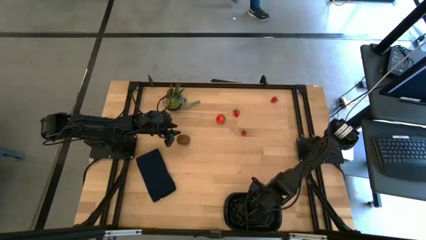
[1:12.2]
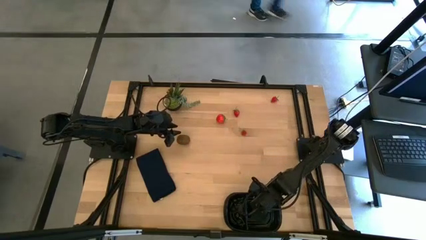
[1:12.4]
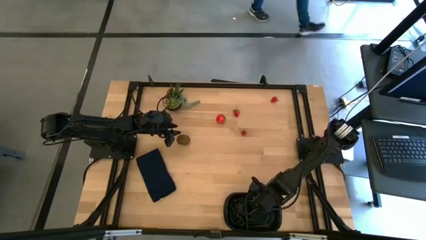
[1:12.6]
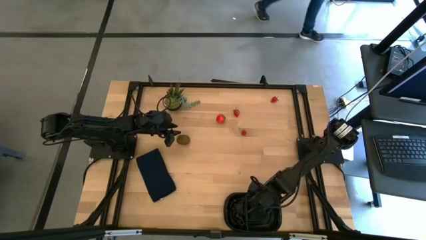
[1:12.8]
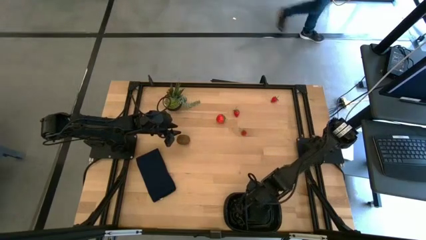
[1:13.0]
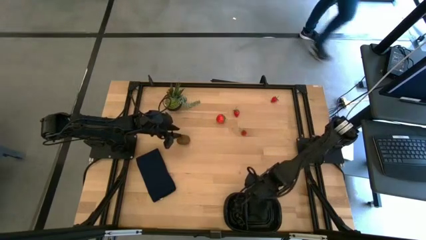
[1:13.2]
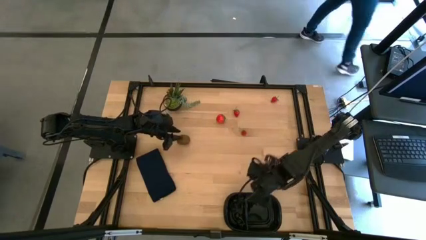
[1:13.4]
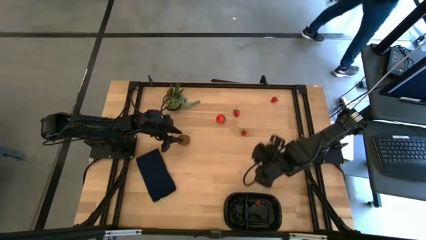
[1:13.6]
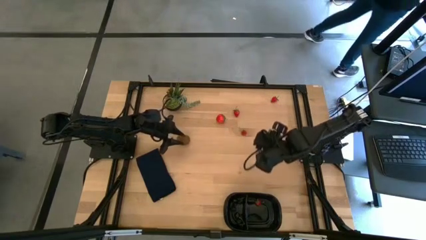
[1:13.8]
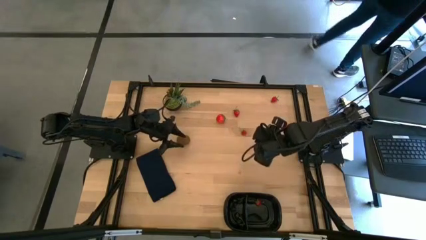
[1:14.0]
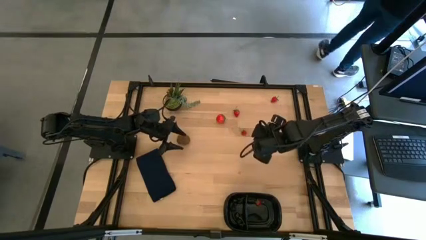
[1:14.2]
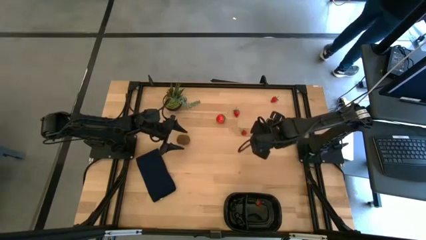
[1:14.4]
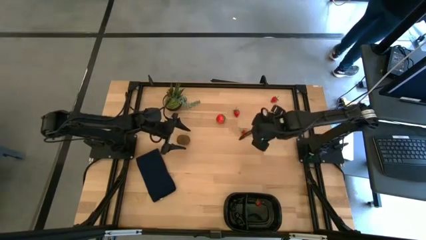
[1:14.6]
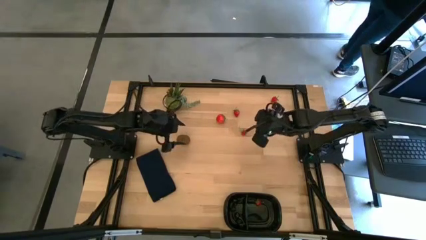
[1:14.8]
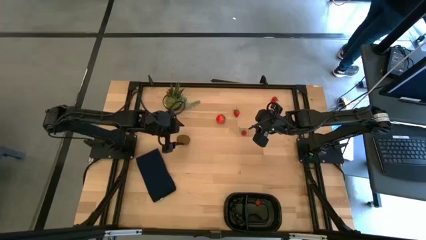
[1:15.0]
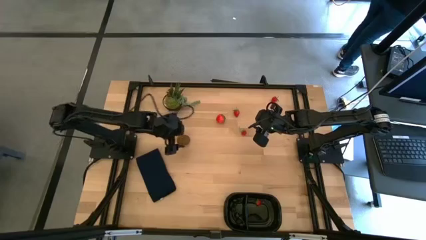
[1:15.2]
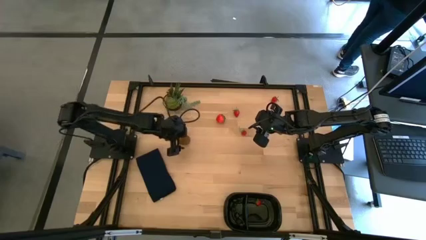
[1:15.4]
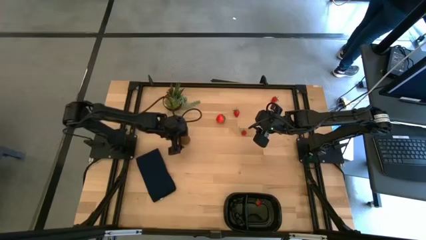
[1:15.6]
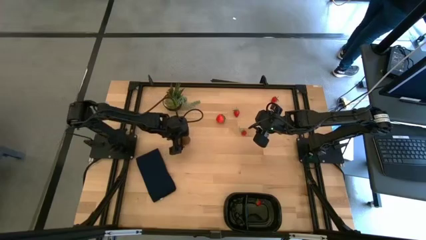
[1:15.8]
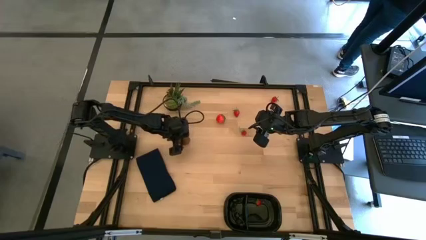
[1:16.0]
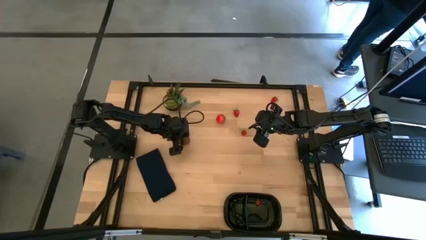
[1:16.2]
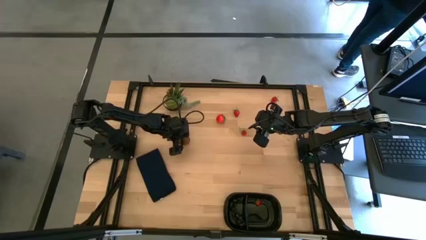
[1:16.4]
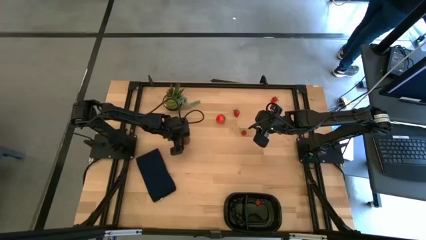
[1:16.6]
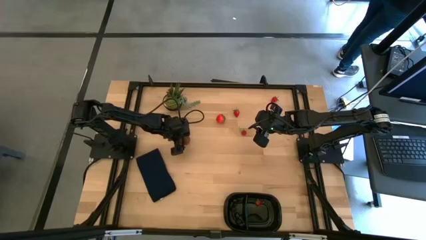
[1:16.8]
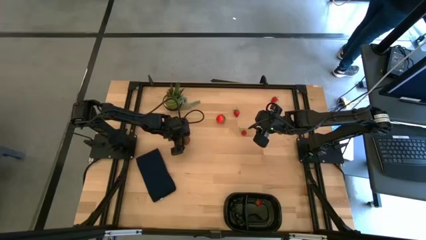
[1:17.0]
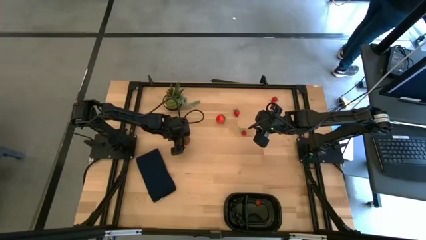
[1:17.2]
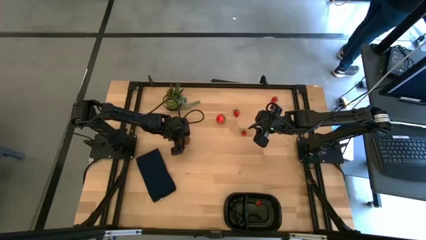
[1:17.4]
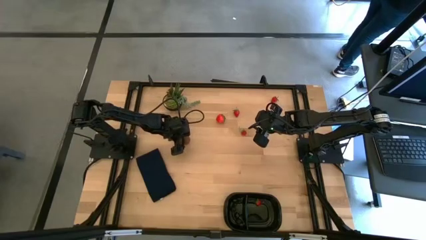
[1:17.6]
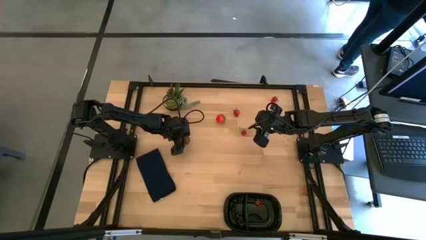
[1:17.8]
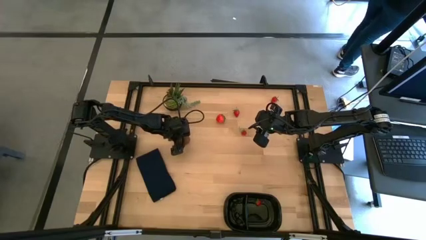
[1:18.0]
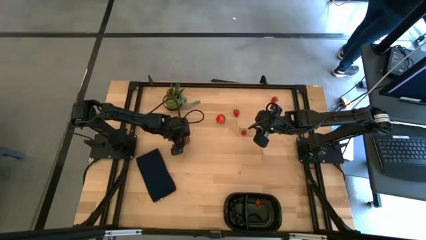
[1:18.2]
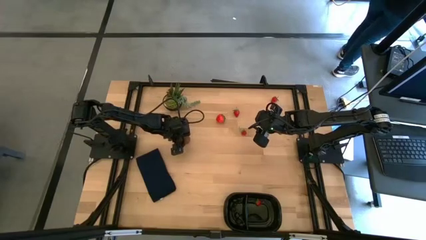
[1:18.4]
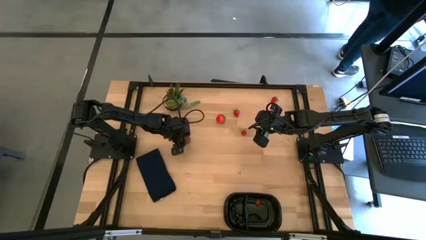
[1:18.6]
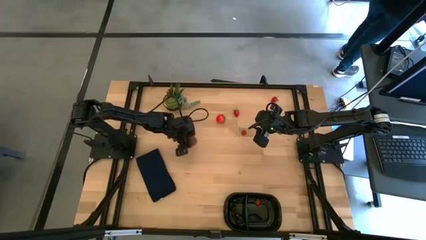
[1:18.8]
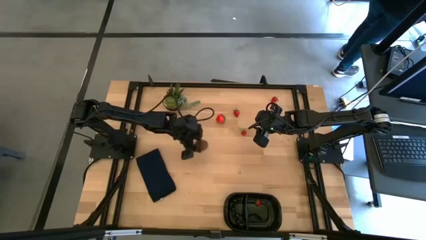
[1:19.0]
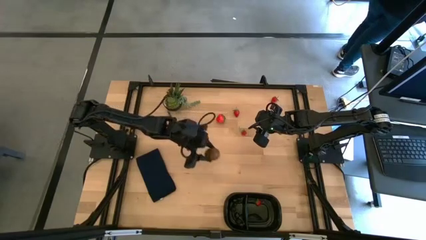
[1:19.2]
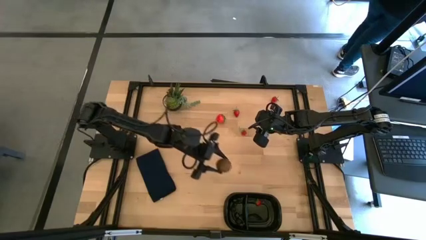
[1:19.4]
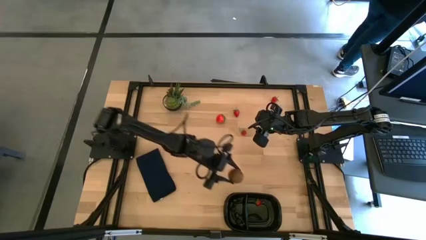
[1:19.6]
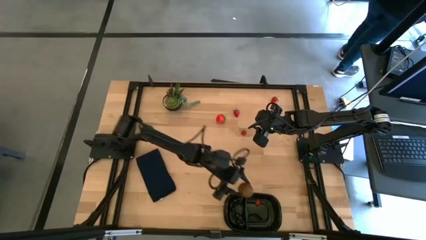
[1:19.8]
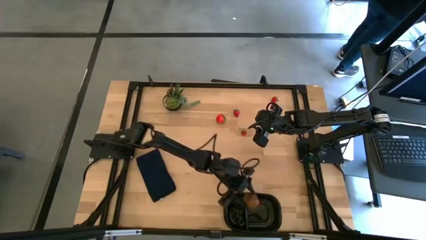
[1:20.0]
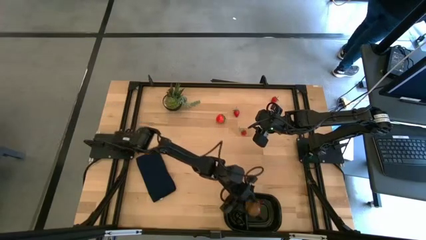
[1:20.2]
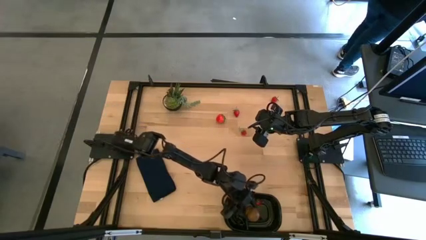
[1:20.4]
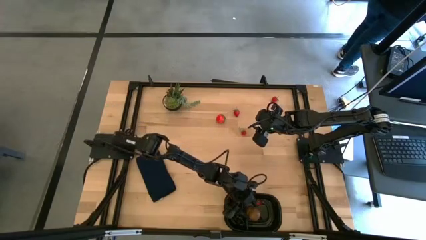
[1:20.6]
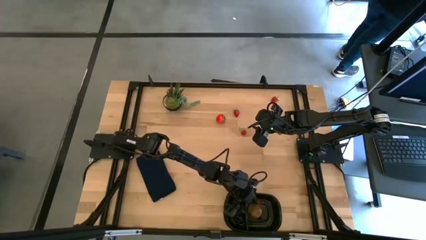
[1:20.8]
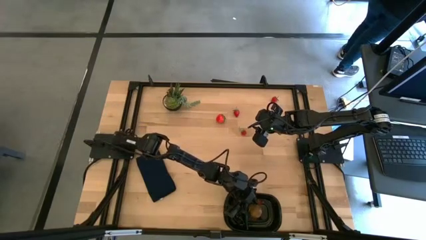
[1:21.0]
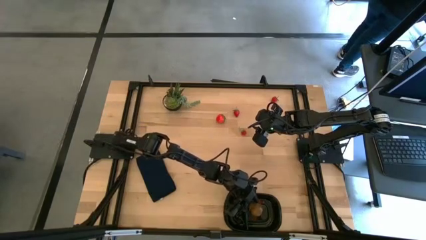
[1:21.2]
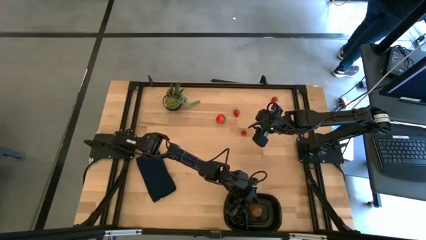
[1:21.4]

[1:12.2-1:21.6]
Task: Pick and placing Produce into tupperware
Put the brown kiwi into the black container

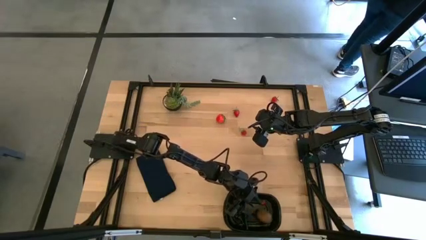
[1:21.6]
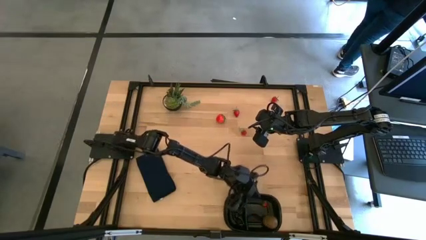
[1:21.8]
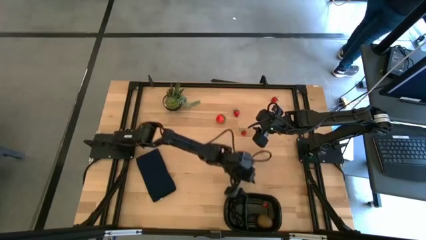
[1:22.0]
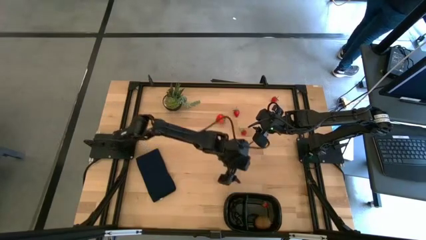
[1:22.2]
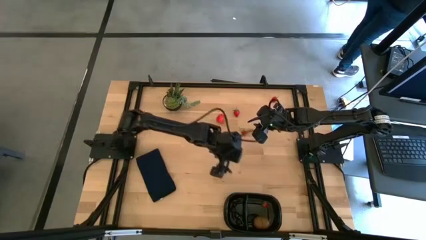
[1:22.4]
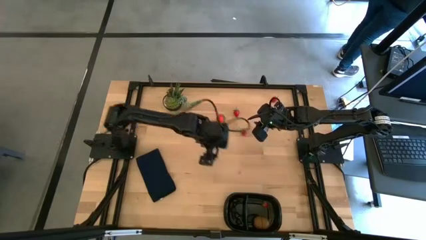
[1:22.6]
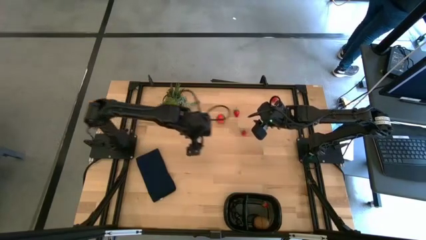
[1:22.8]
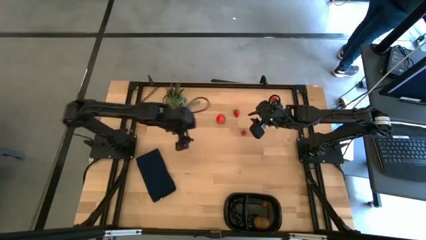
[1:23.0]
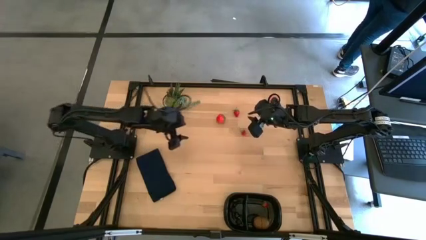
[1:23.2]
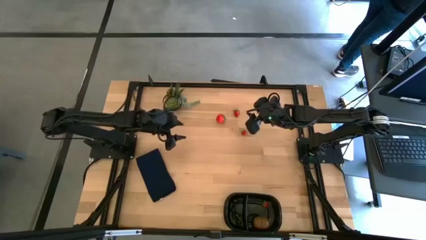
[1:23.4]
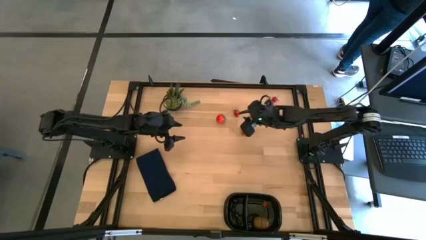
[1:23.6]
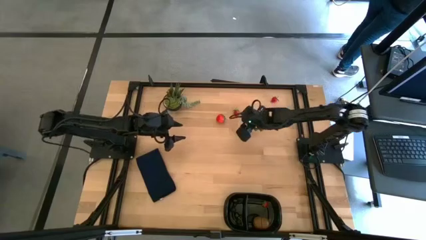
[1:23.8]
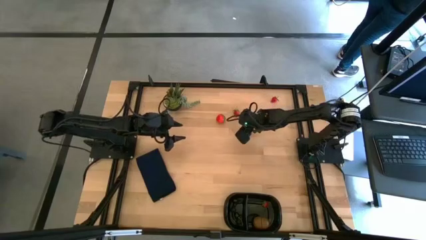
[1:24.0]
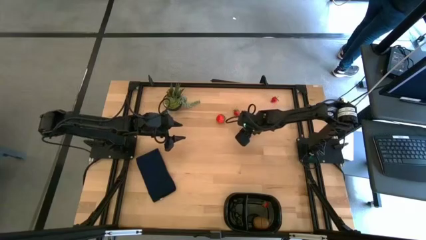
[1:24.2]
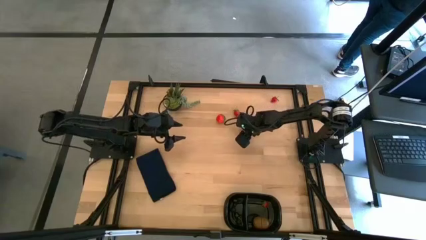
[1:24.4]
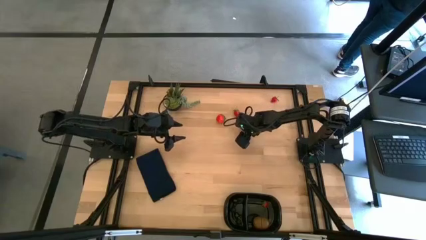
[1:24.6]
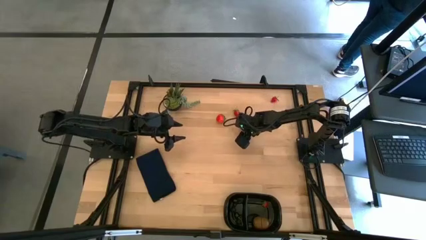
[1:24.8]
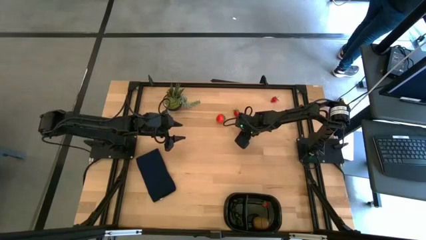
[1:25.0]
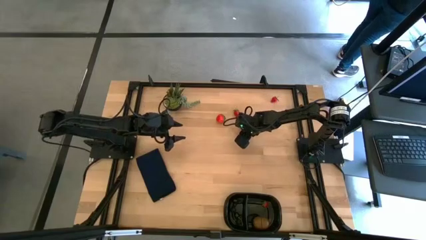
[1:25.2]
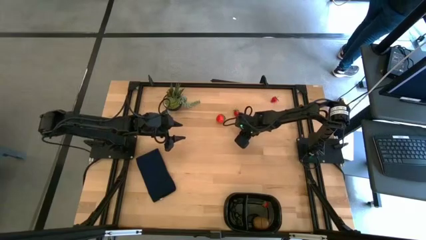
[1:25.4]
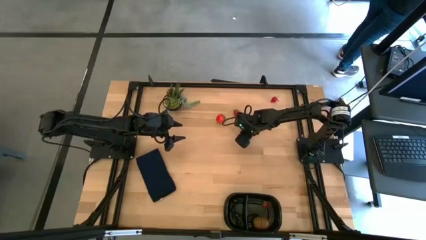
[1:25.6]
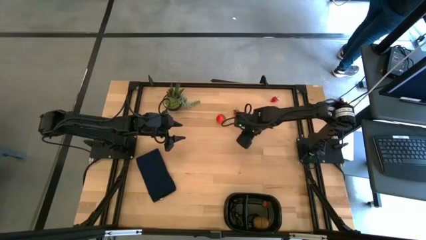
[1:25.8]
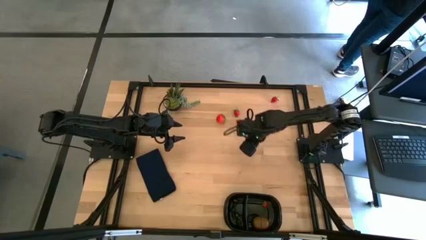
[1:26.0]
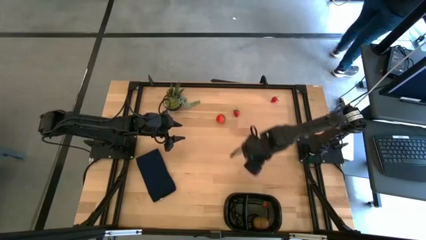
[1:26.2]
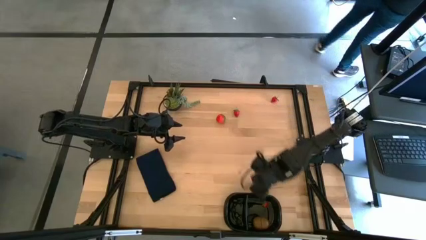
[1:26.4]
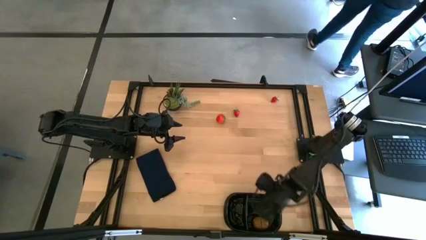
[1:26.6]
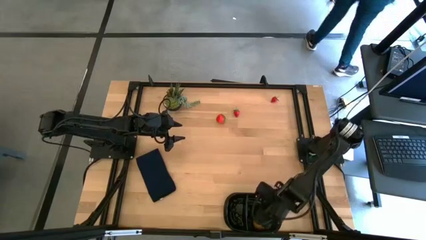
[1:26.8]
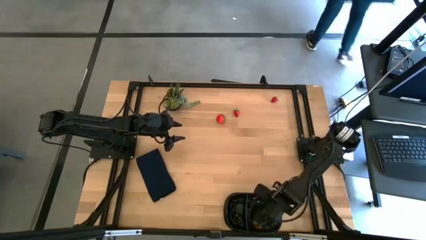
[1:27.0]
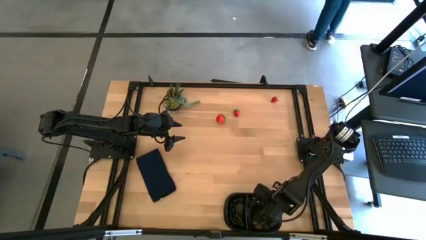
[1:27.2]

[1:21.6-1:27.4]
Put the small red strawberry into the black container
